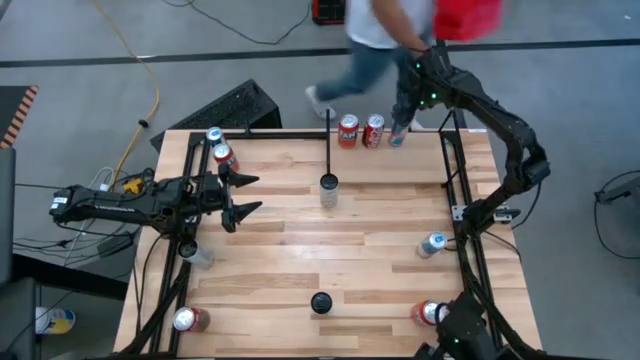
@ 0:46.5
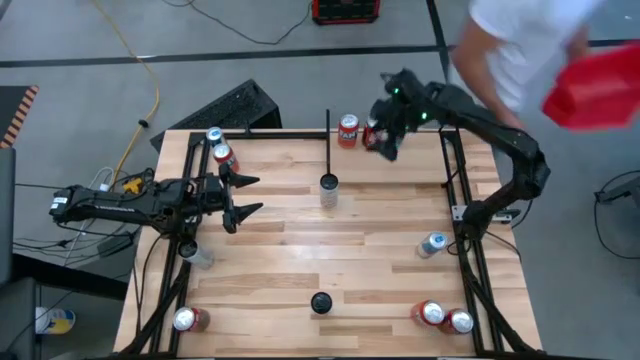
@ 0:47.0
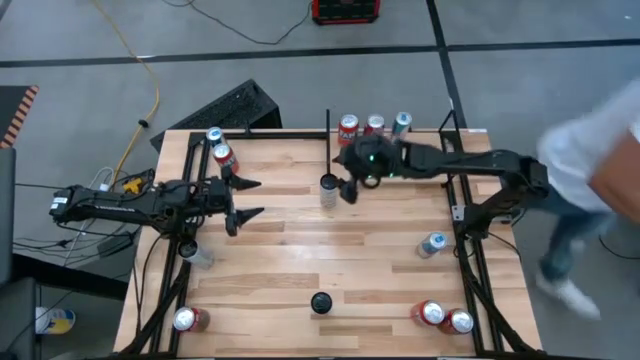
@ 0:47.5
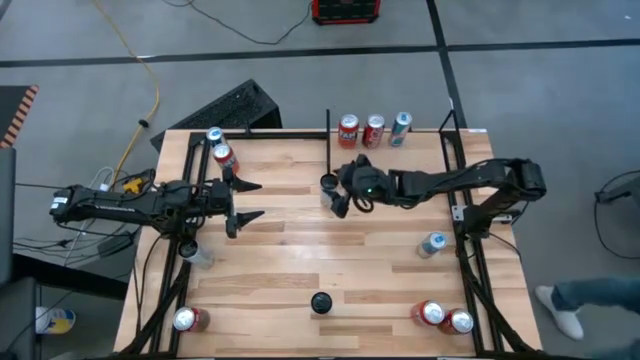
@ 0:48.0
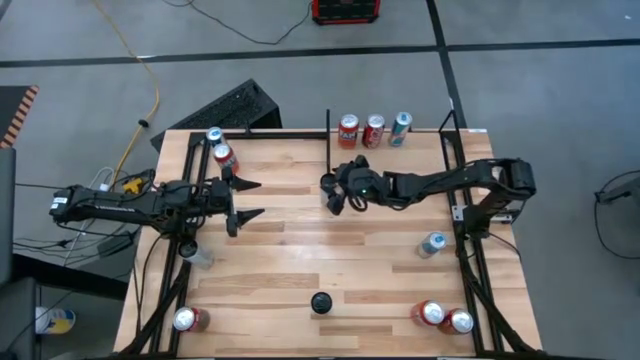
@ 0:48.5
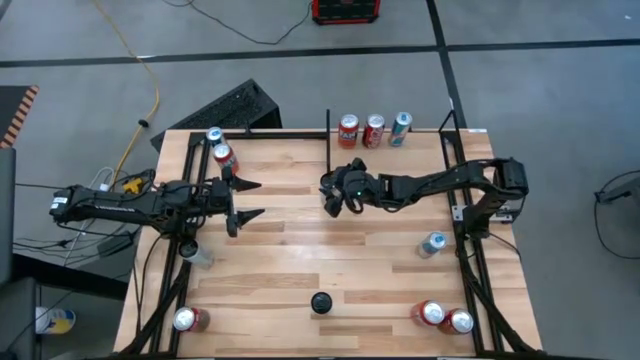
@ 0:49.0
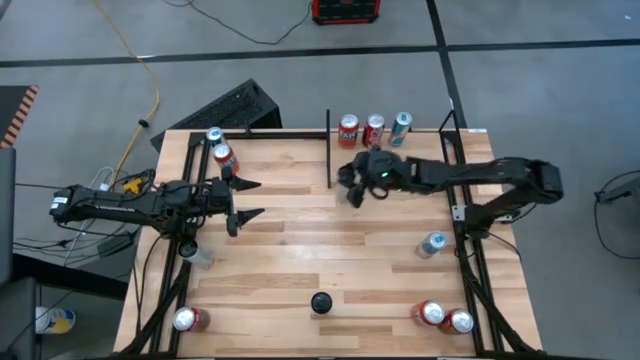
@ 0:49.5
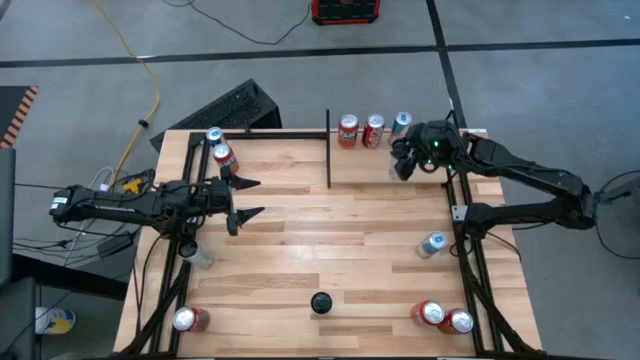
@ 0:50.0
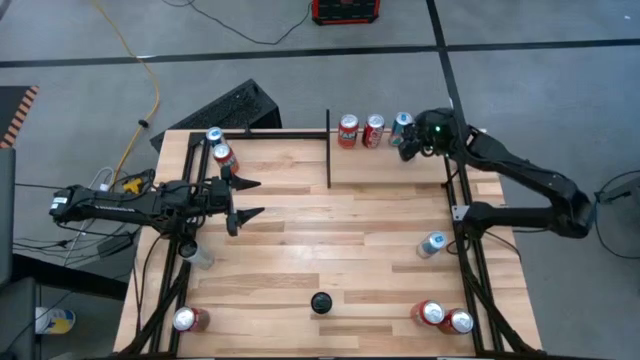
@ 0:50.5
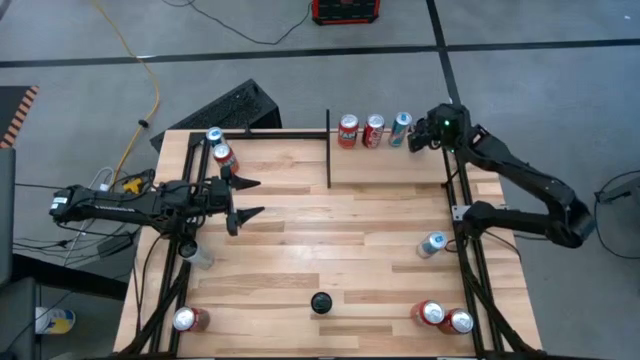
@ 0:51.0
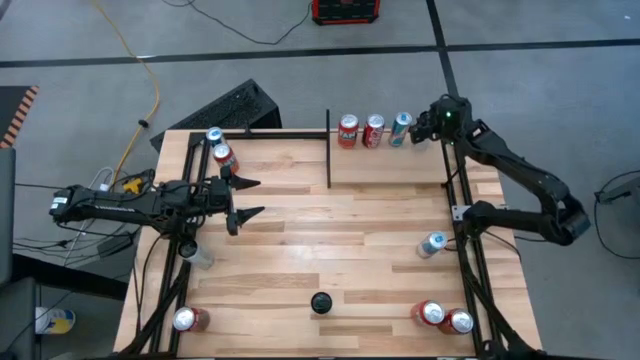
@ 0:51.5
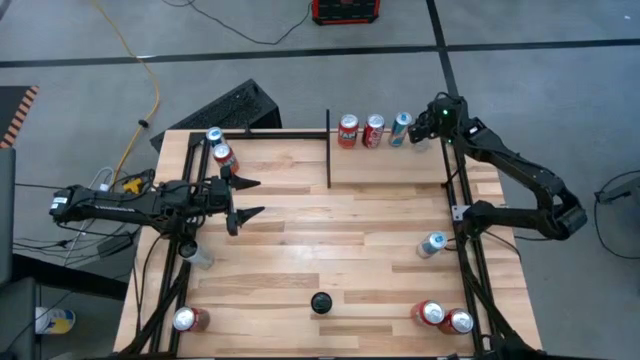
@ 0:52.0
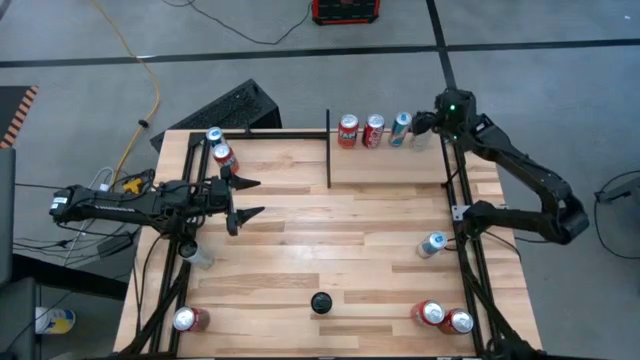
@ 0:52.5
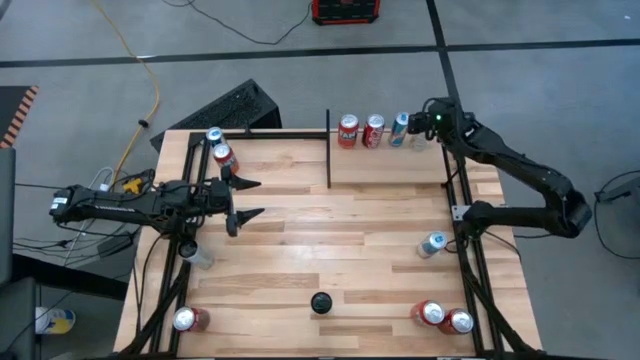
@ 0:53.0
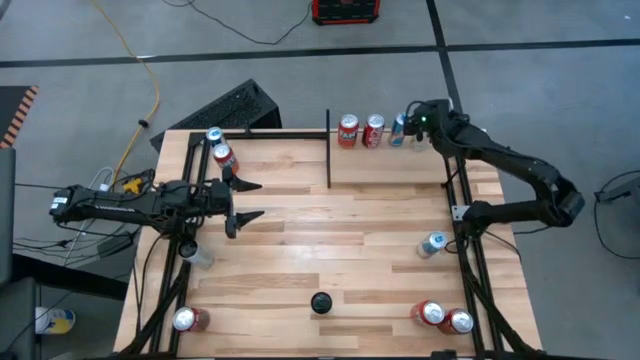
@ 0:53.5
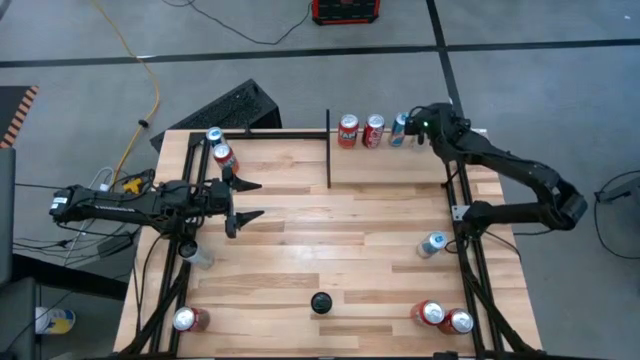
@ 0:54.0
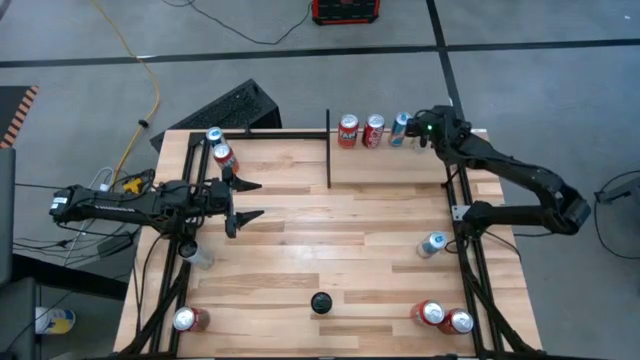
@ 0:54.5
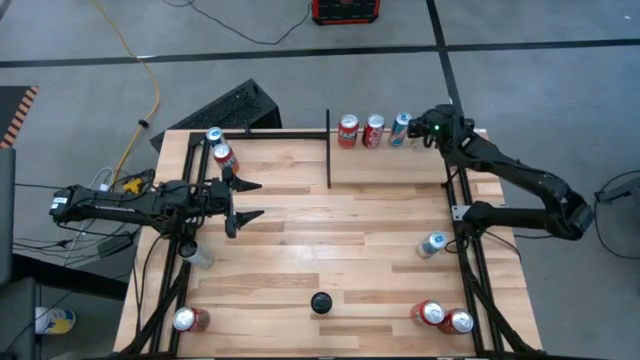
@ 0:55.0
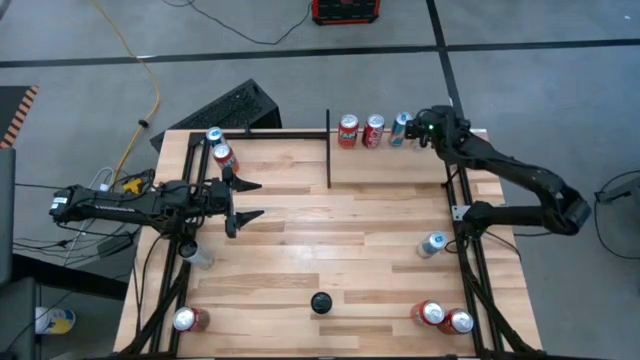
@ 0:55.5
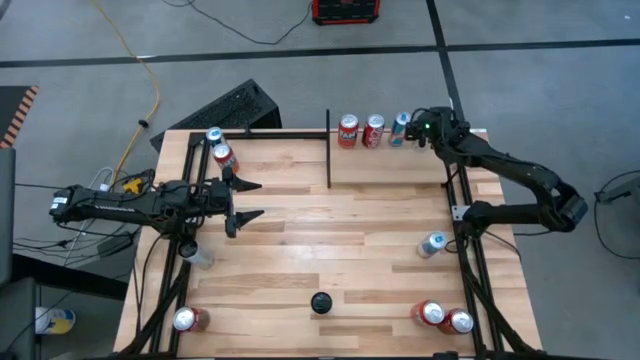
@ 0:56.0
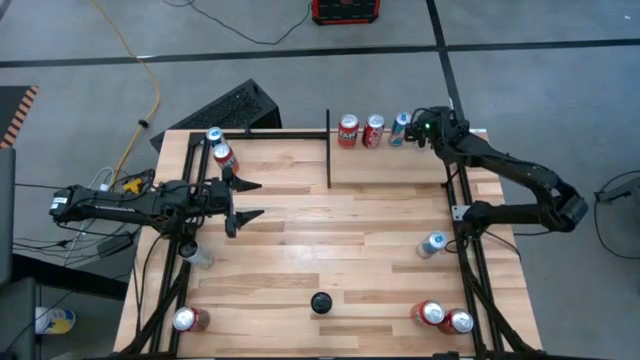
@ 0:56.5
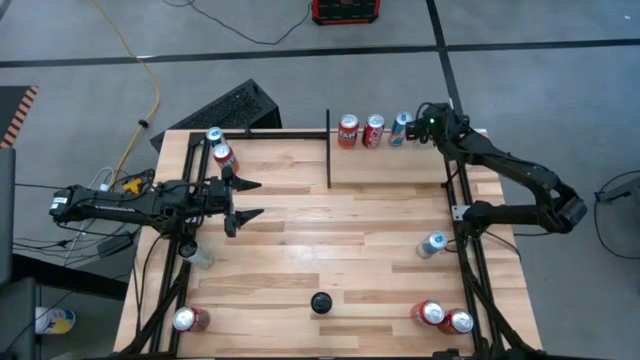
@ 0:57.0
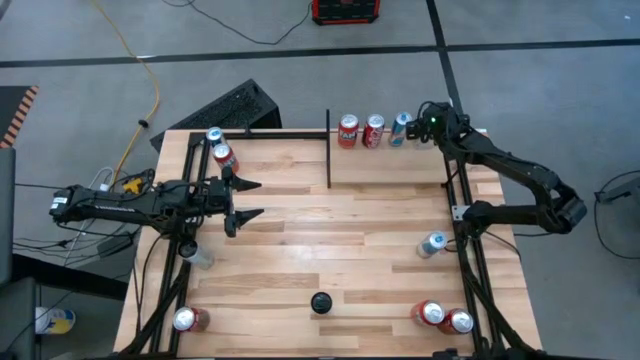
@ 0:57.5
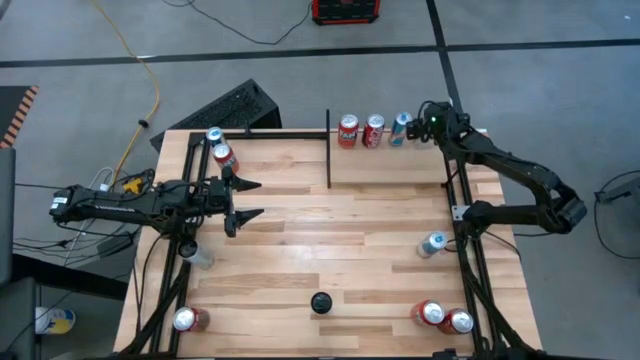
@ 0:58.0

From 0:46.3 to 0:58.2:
Task: Place canned beverage on shelf
Put the top white-yellow soda can on the shelf

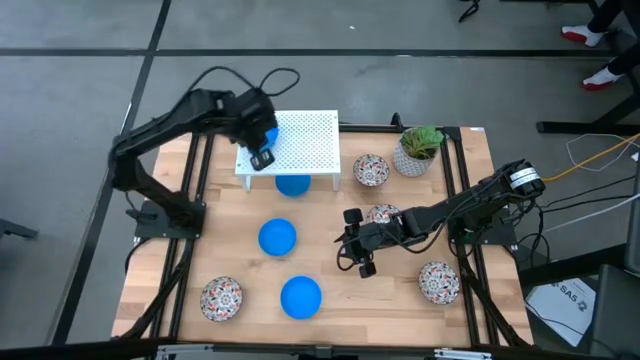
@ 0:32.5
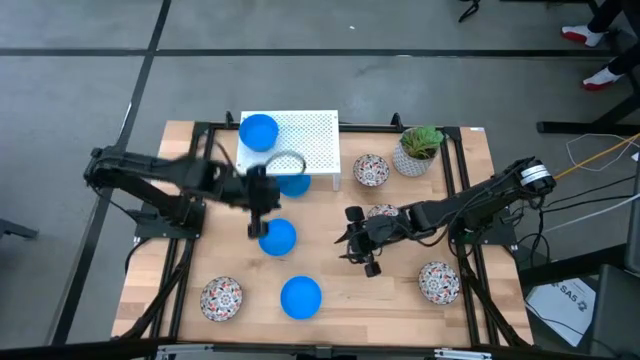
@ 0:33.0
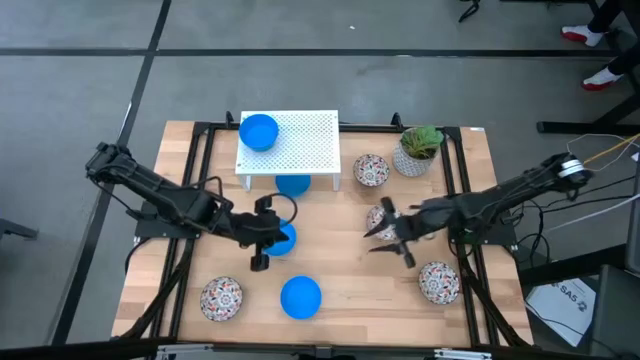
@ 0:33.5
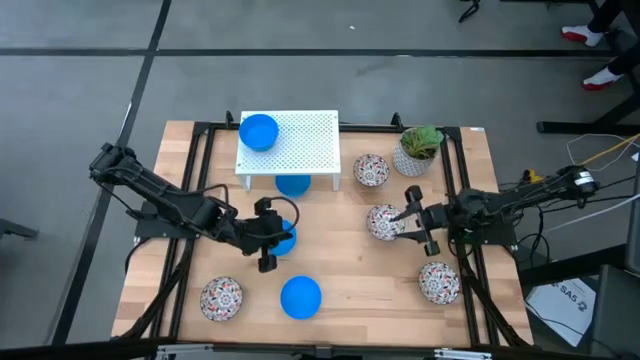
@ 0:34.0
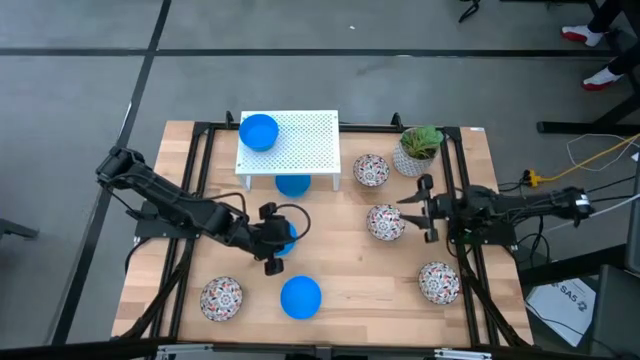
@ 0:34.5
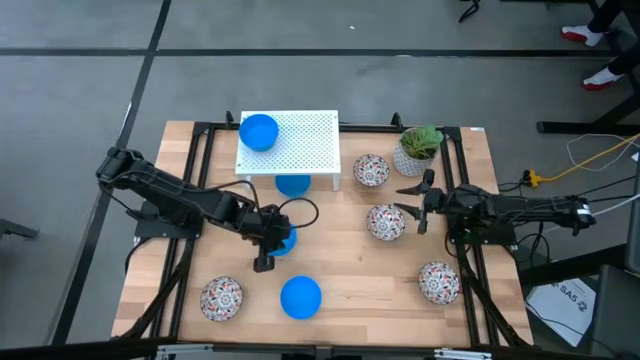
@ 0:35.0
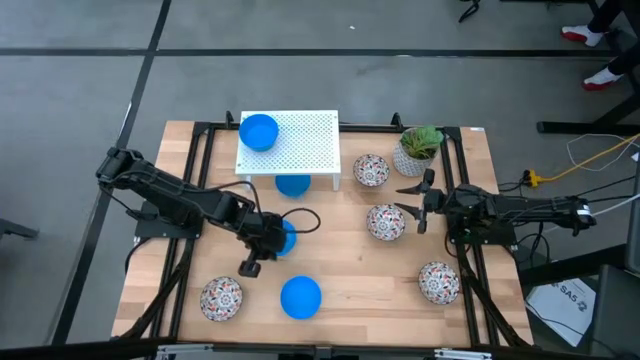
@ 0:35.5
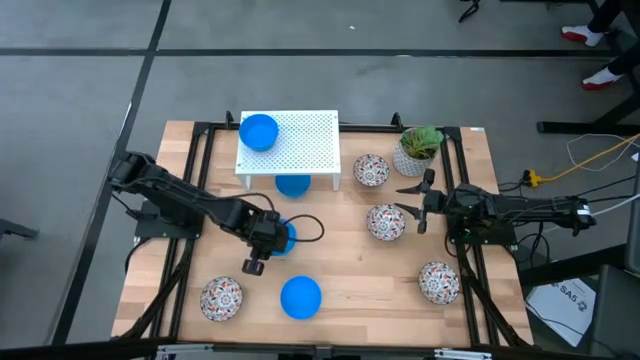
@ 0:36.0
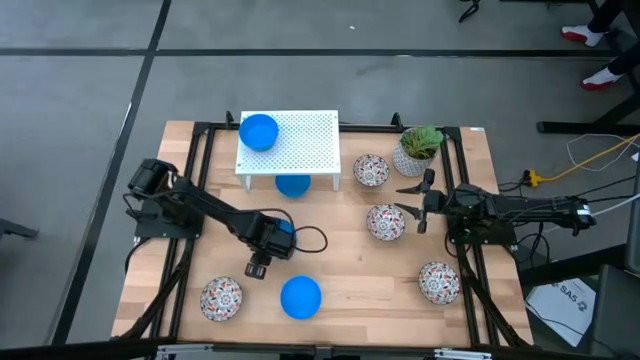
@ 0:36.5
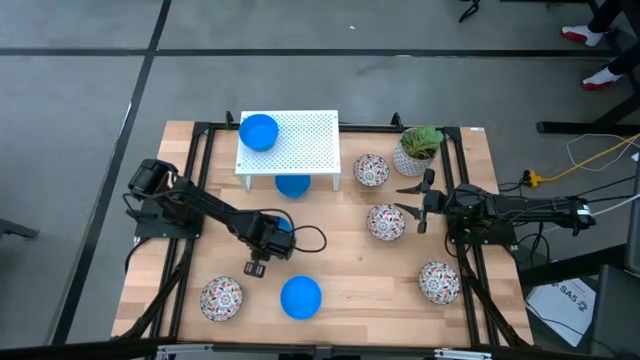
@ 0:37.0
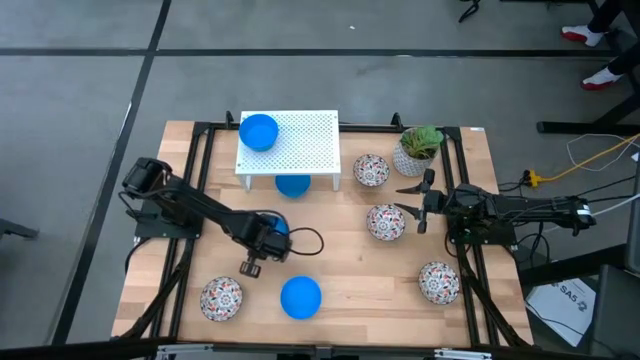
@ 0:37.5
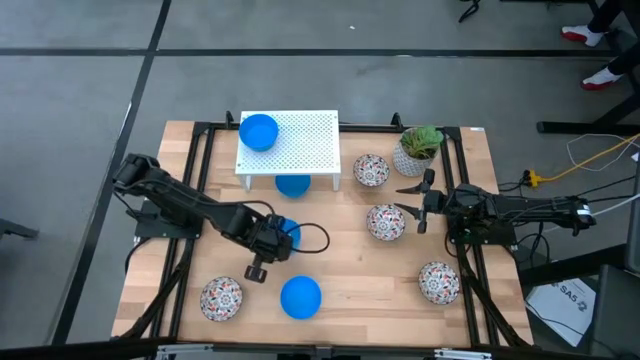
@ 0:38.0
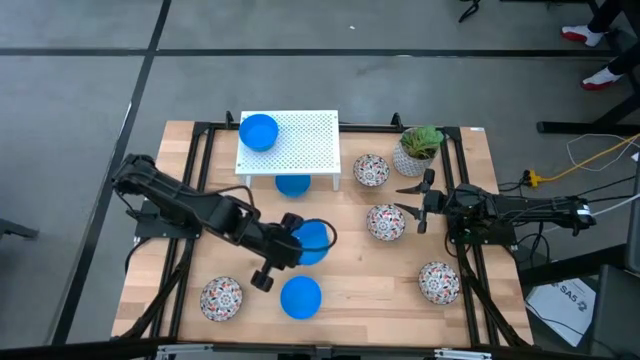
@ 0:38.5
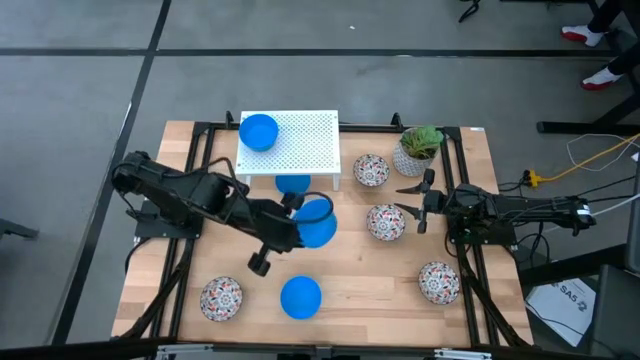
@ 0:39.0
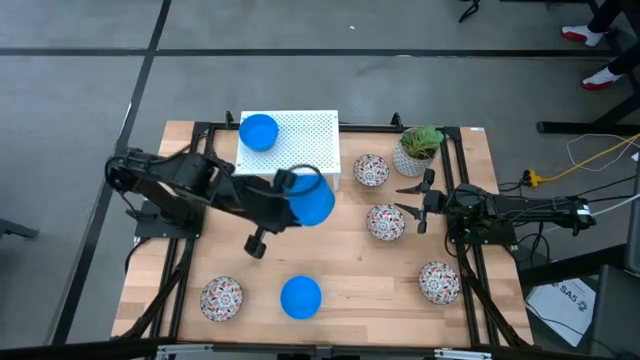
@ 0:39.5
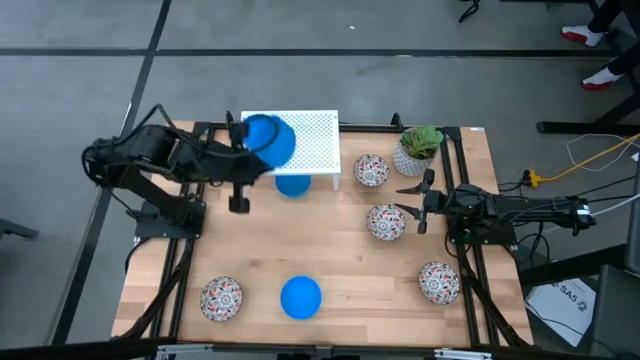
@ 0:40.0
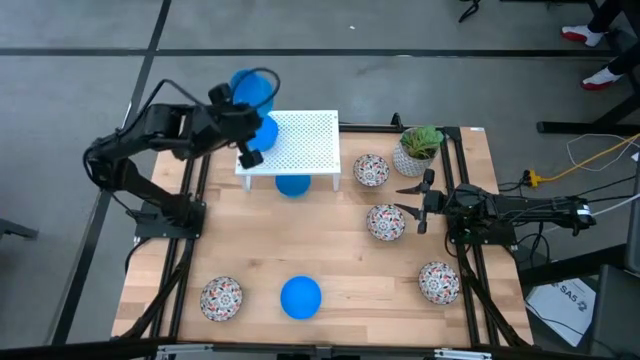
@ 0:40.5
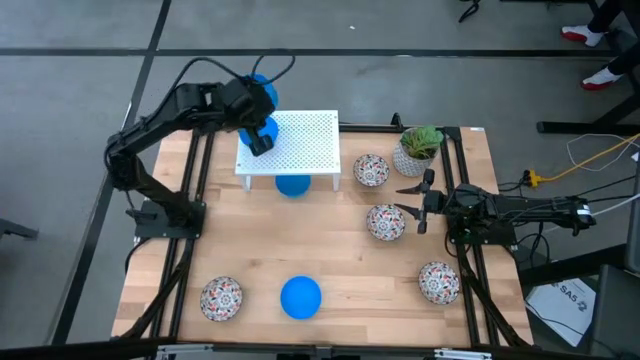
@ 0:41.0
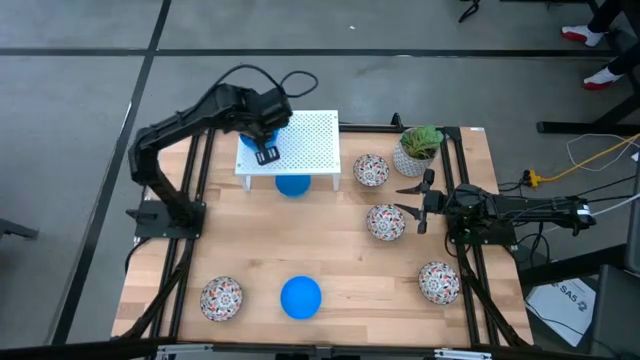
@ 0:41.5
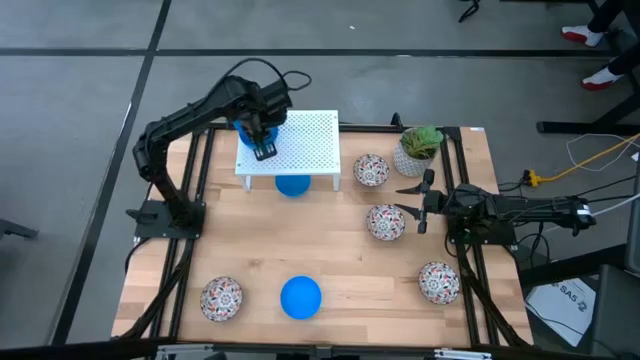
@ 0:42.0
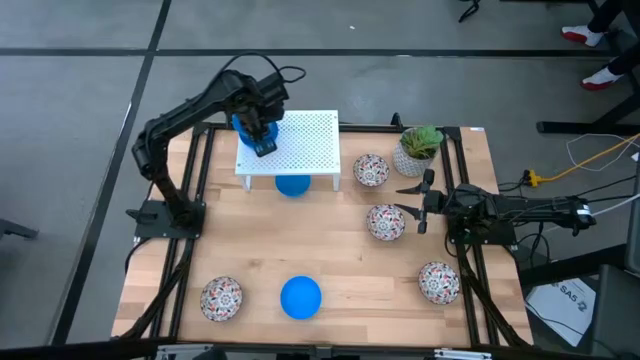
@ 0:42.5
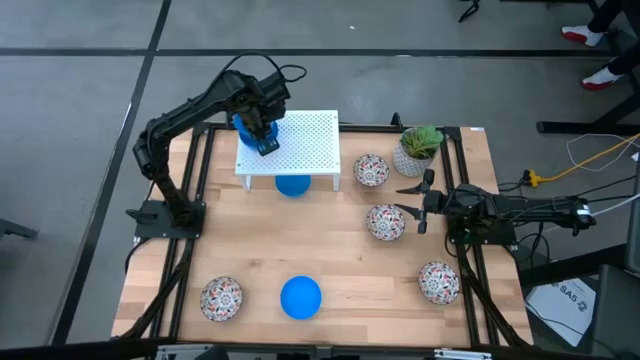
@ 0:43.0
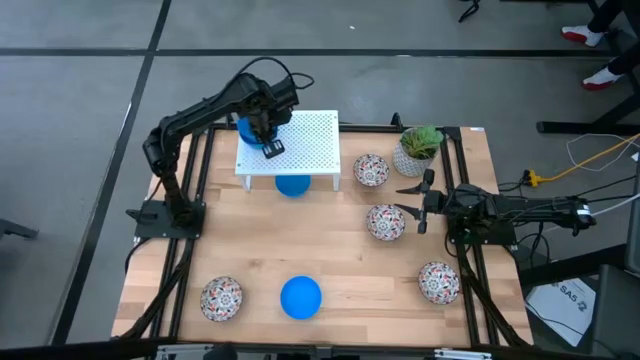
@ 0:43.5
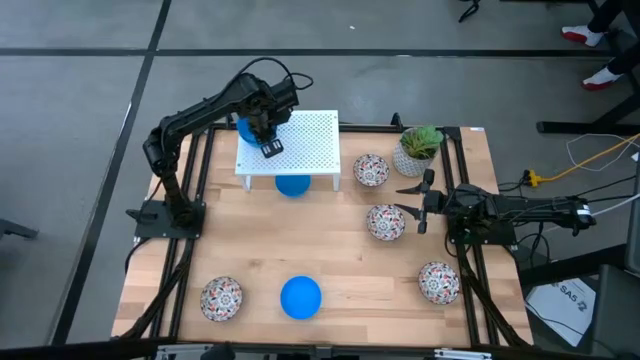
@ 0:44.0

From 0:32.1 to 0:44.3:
Task: Pick & Place Mini bowls
Stack the blue bowl on the blue bowls on the shelf
